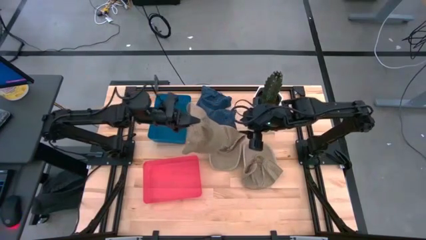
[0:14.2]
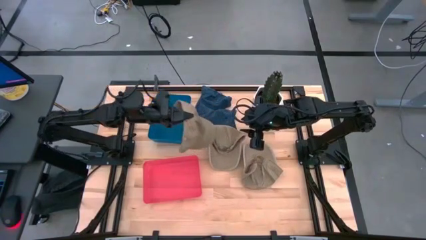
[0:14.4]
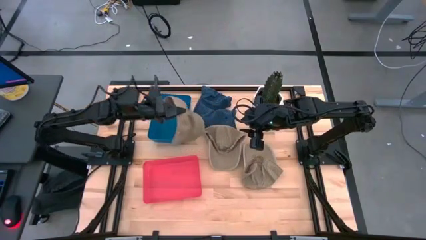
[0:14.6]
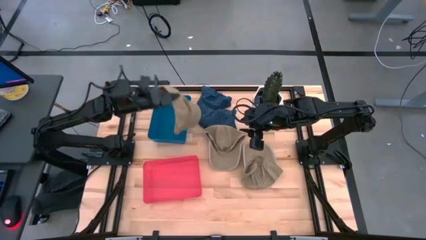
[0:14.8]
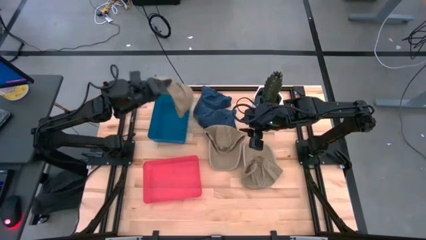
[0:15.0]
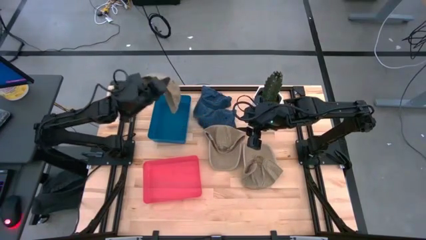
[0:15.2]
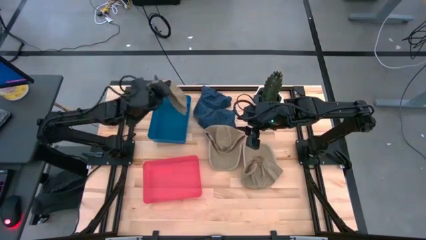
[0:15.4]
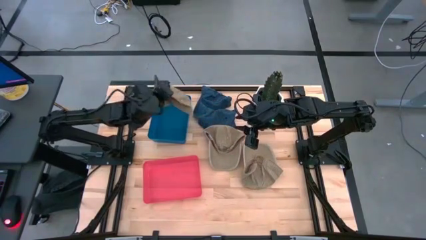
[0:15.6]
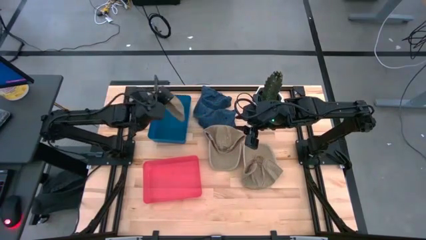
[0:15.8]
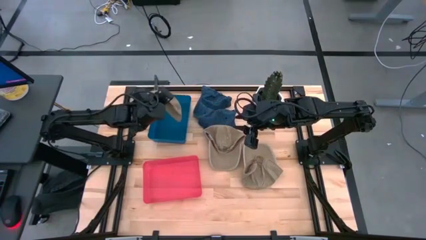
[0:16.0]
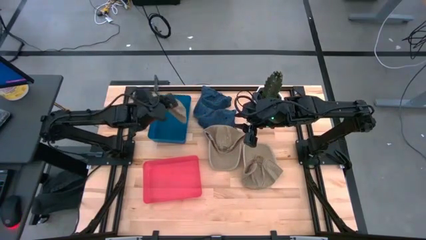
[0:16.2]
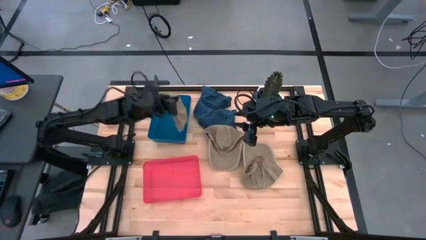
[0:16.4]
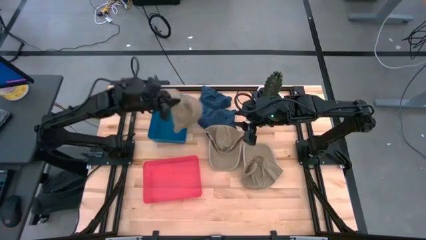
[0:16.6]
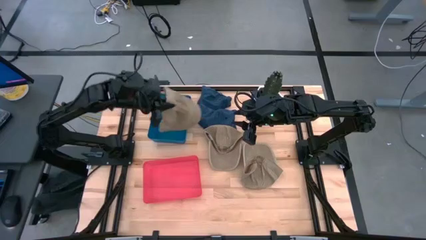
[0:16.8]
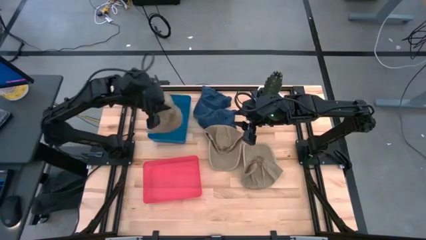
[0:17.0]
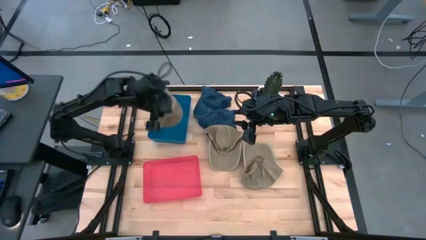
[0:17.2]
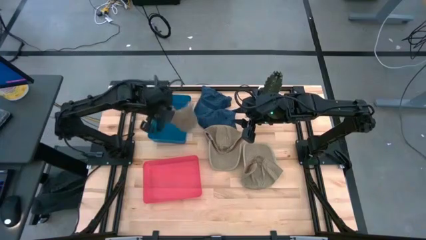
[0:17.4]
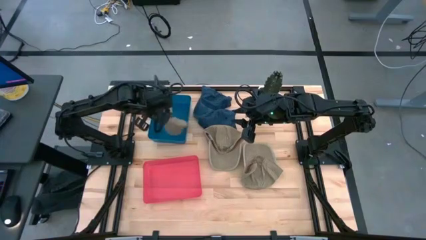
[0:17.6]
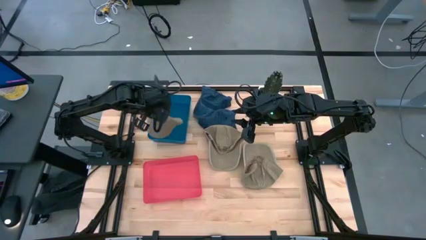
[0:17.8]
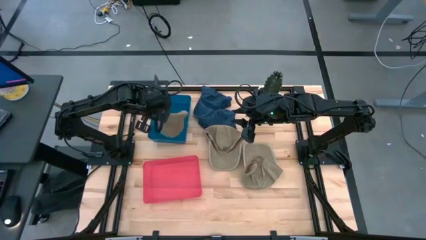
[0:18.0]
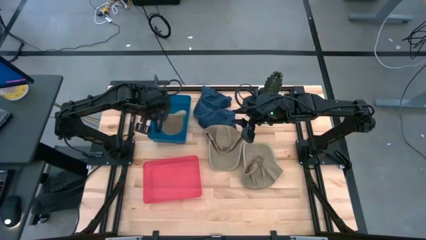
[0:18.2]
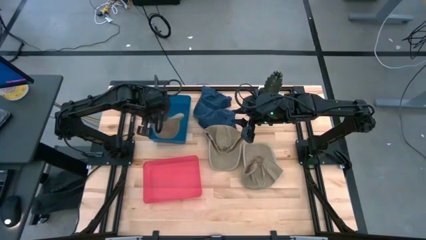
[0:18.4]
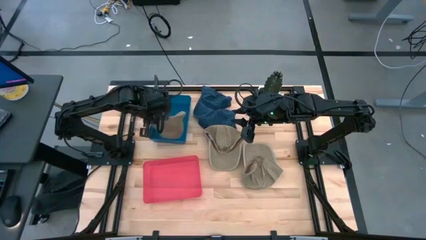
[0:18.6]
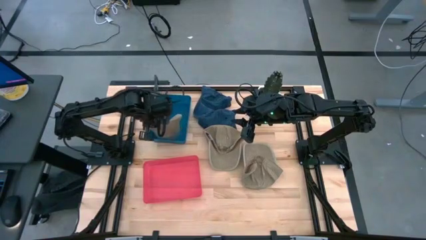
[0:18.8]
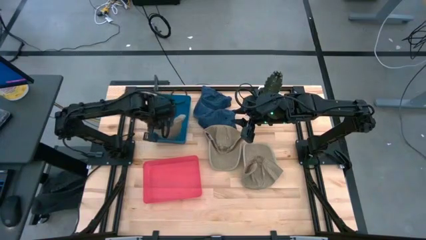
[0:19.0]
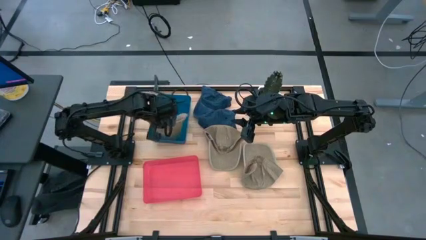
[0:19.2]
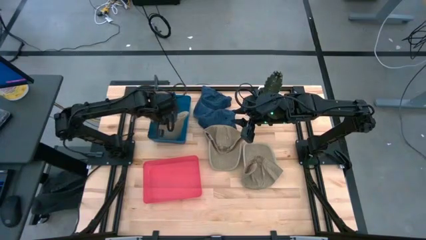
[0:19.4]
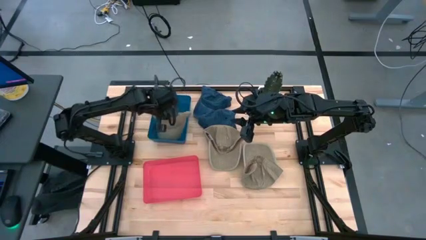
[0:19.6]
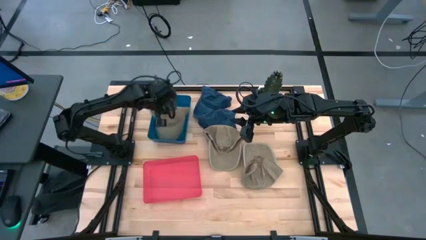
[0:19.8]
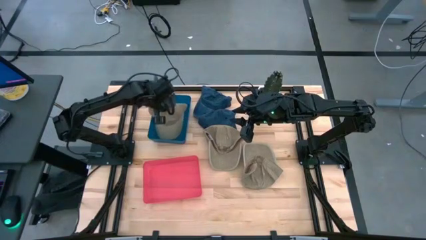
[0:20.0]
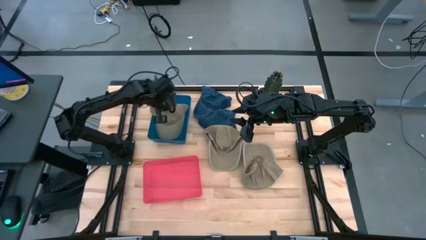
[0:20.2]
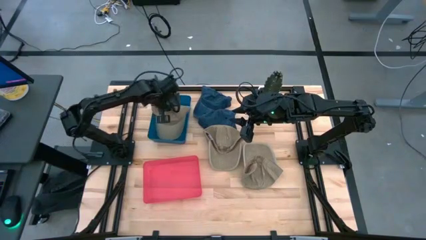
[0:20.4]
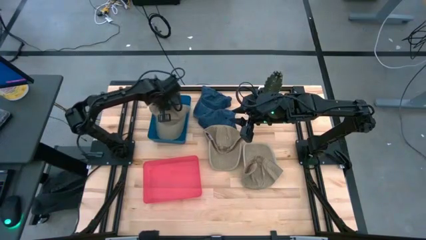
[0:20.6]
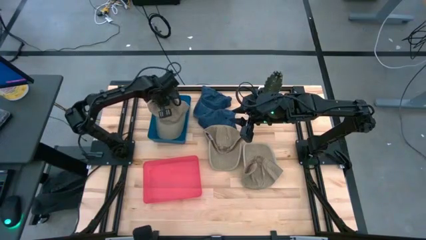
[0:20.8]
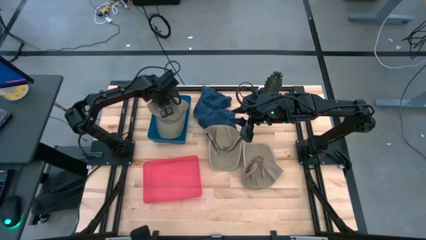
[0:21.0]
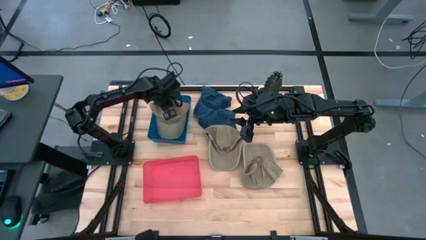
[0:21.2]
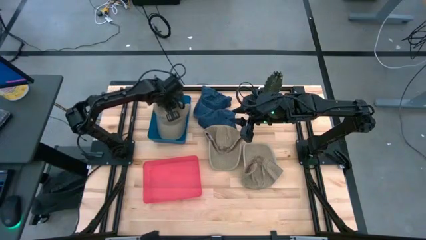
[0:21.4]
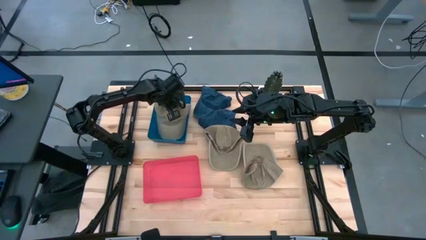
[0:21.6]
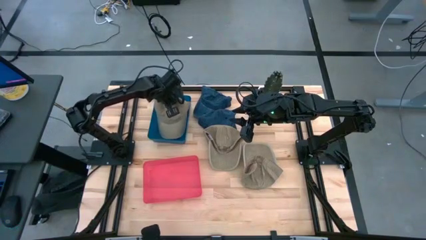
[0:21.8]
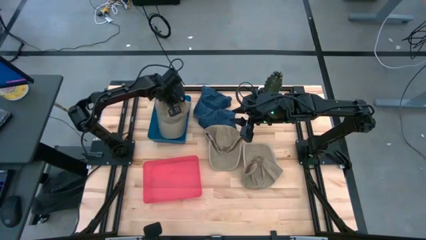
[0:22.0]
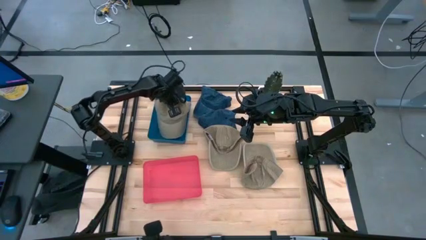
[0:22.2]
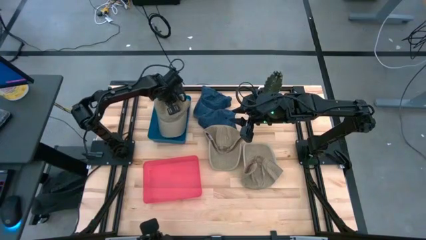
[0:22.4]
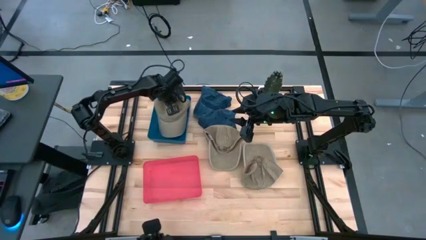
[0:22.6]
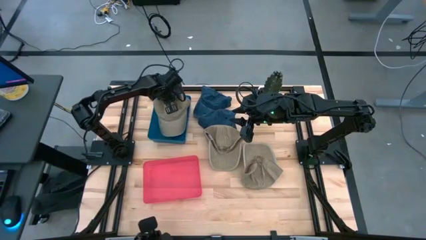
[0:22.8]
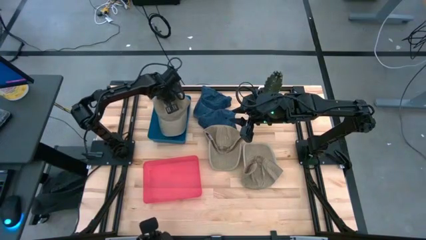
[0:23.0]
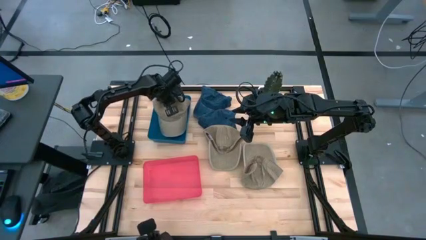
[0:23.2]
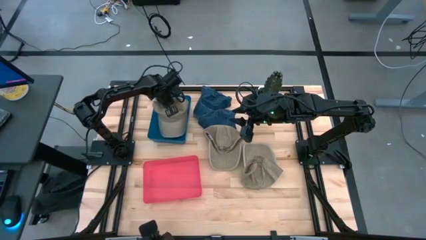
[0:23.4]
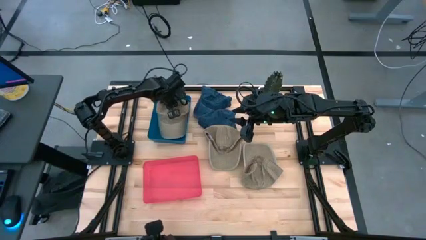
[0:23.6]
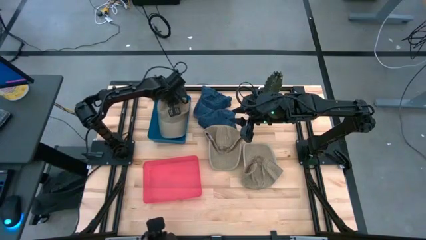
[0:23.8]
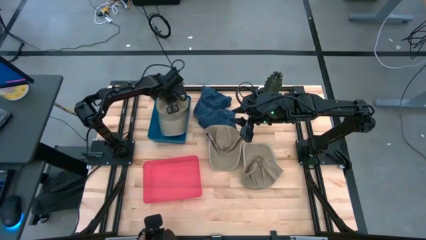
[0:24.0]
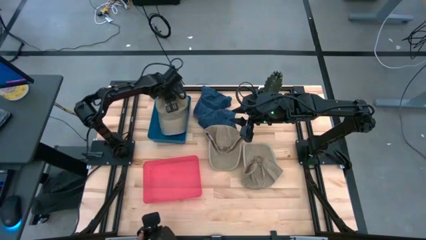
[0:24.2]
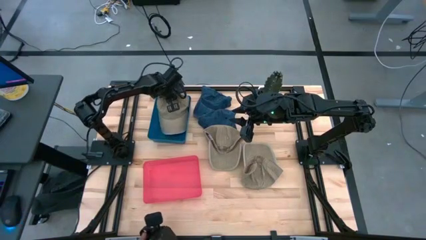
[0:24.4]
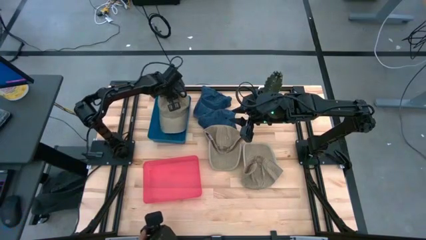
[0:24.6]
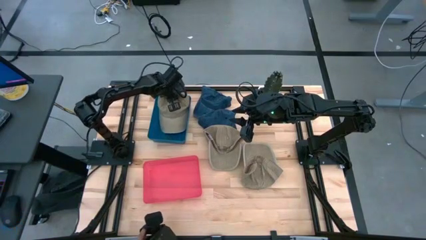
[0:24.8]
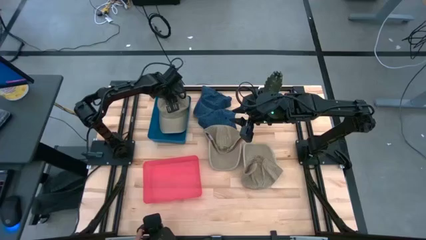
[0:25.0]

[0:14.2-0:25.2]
Task: Pick & Place hat
Put the bottom brown cap into the blue bin
